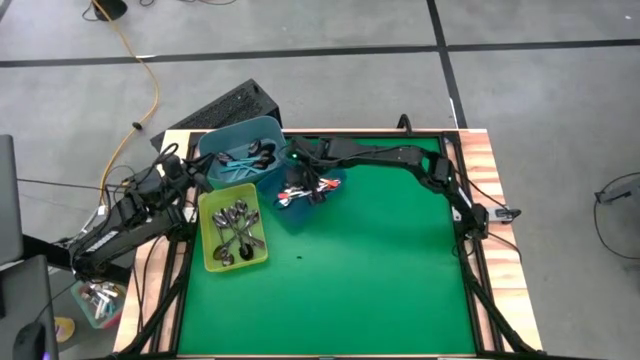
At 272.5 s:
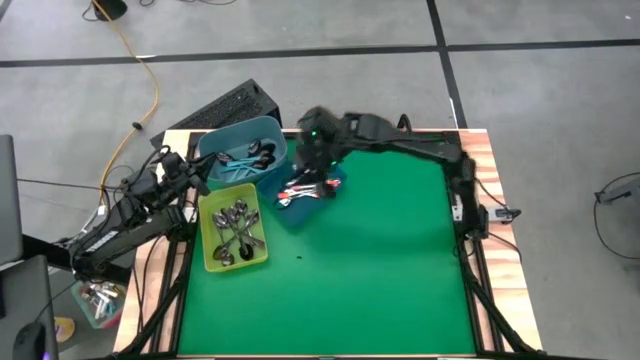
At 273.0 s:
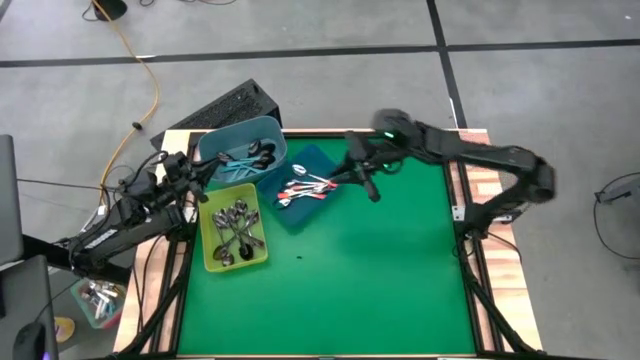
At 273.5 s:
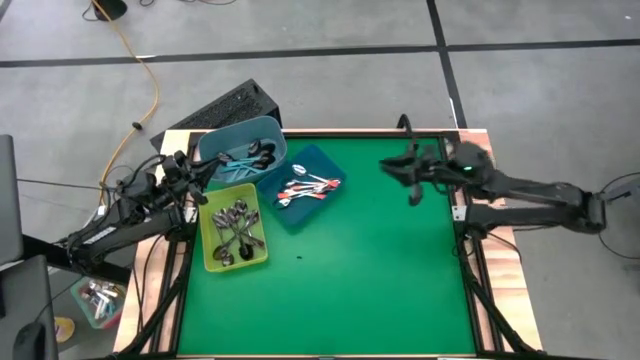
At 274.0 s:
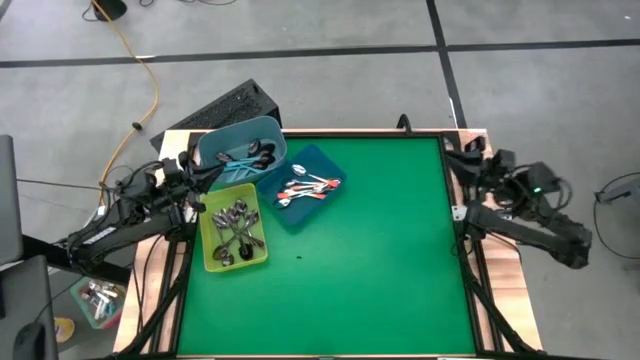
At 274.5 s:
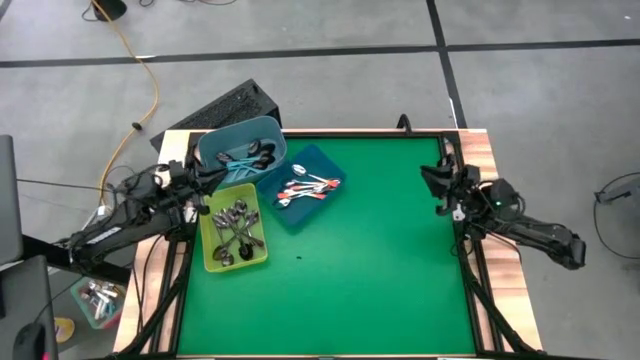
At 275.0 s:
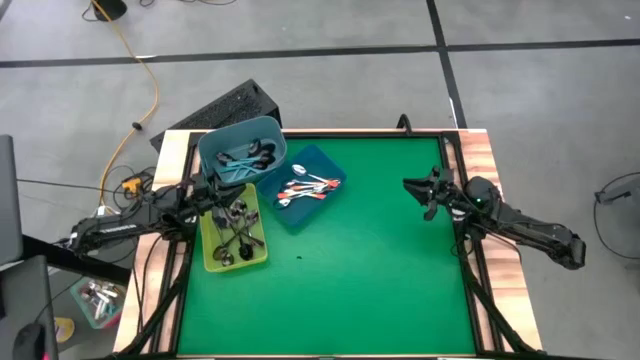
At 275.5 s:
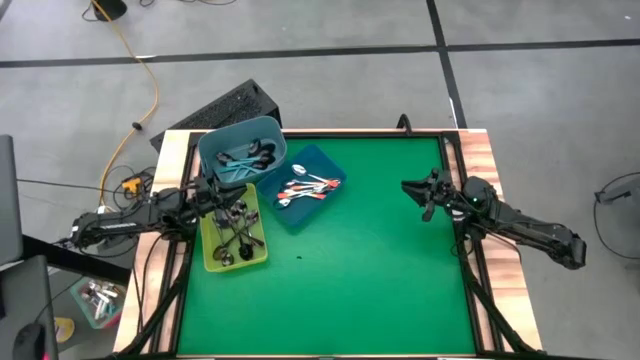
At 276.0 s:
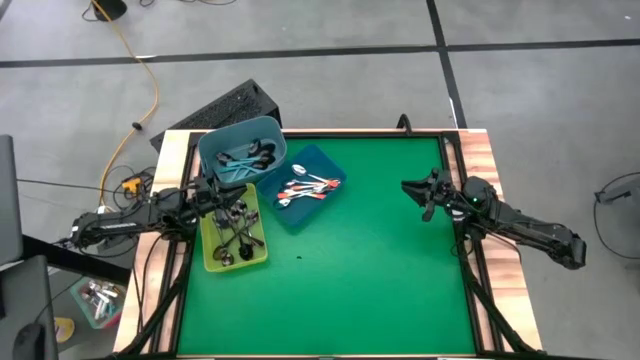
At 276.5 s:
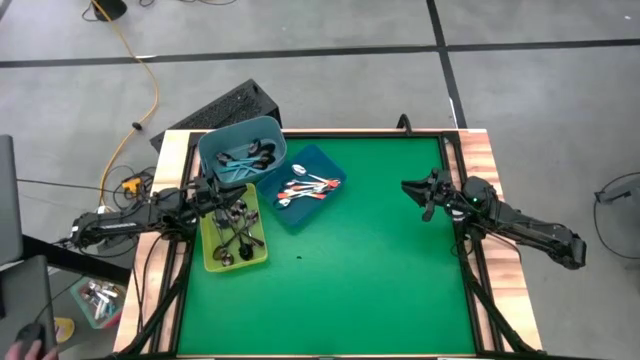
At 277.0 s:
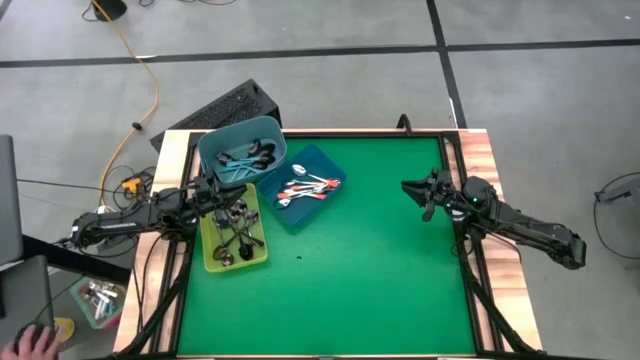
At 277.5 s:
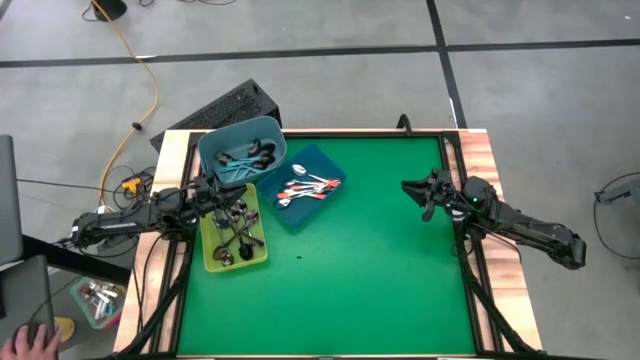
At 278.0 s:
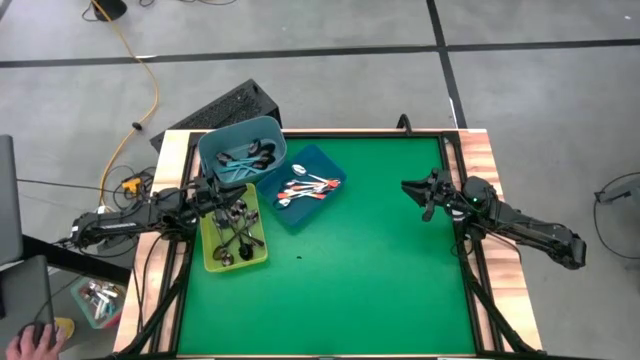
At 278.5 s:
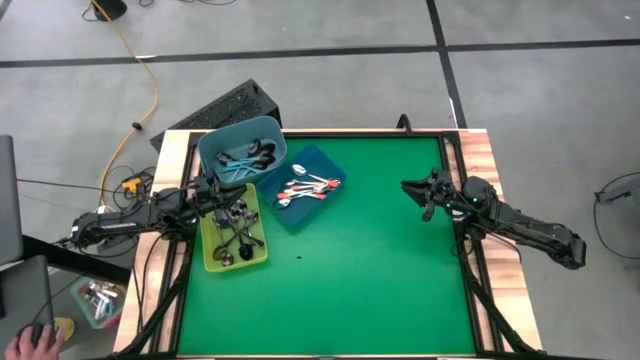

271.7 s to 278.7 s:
Task: Sort silverware by color (type)
Return to Home Position

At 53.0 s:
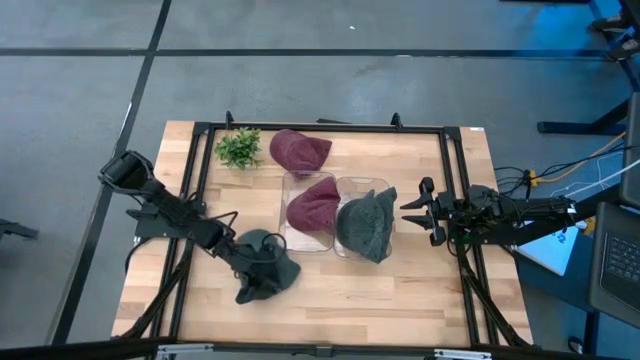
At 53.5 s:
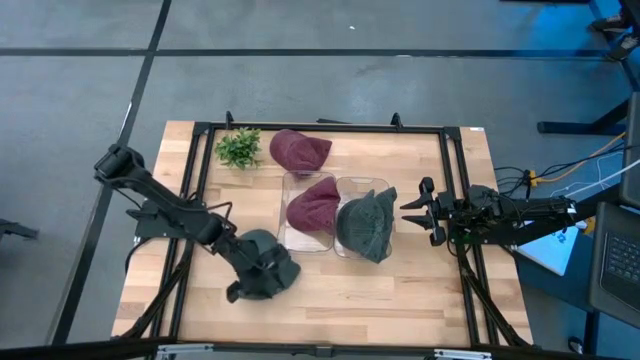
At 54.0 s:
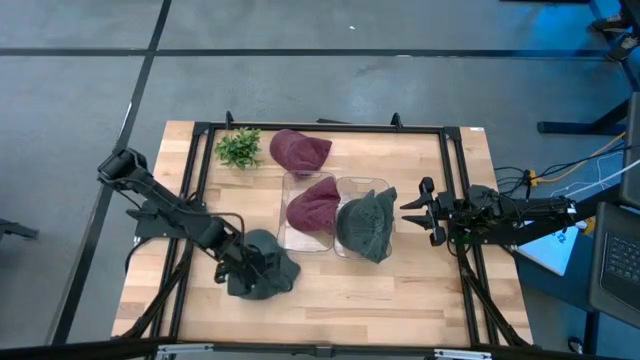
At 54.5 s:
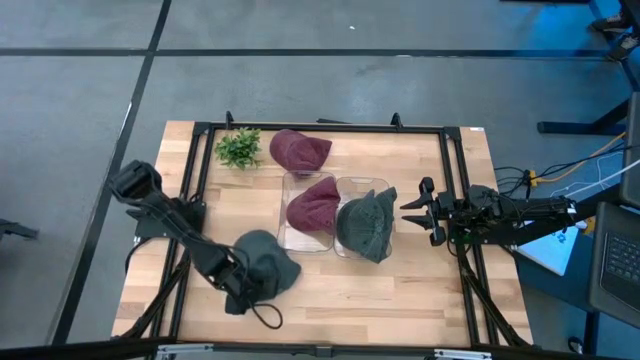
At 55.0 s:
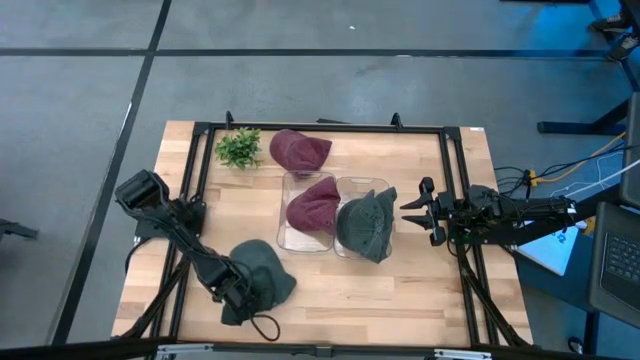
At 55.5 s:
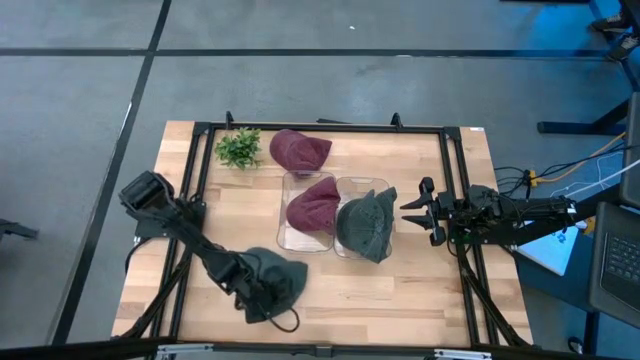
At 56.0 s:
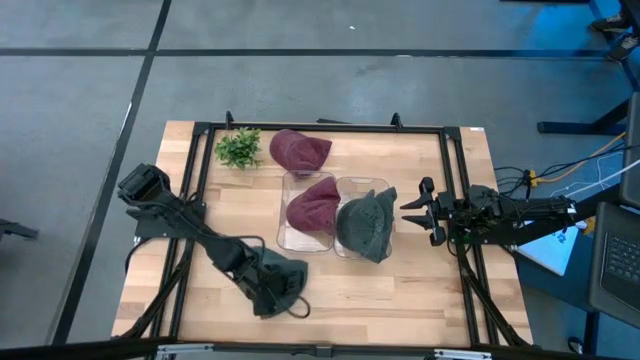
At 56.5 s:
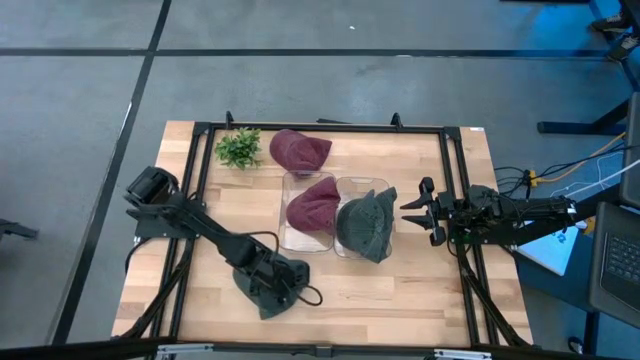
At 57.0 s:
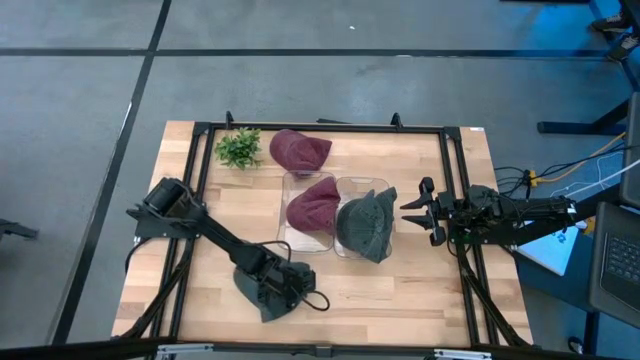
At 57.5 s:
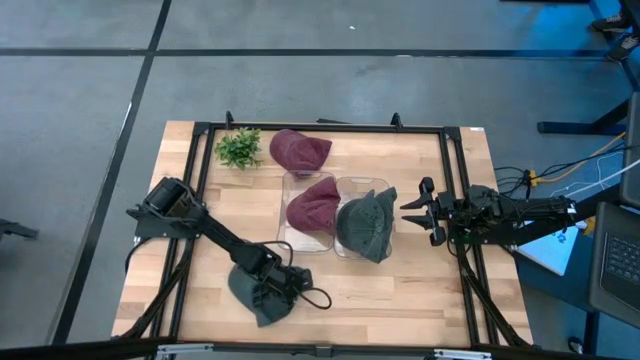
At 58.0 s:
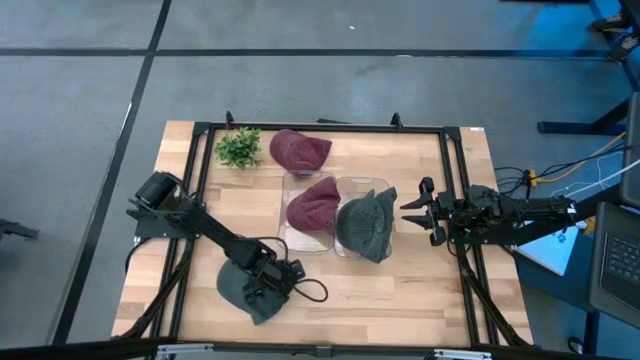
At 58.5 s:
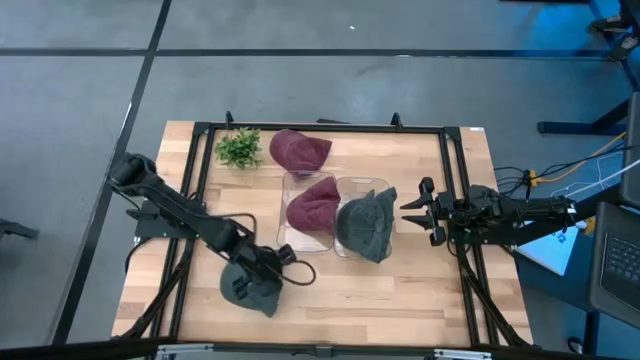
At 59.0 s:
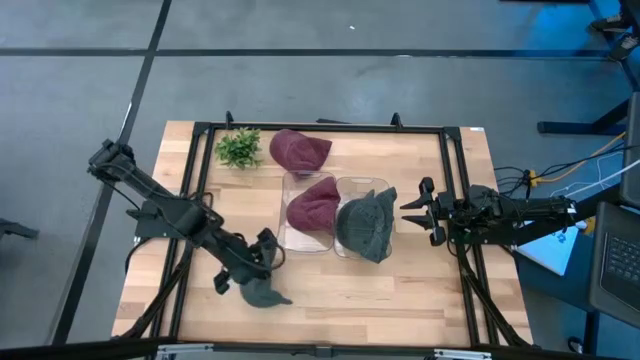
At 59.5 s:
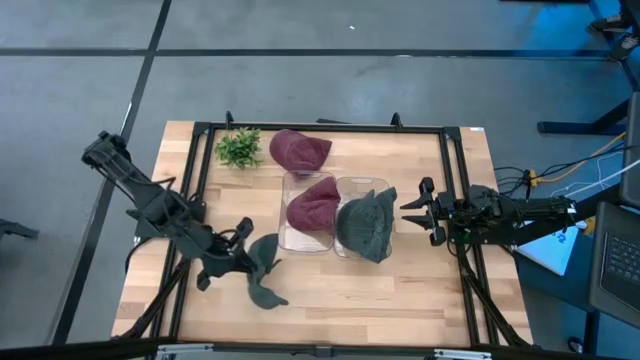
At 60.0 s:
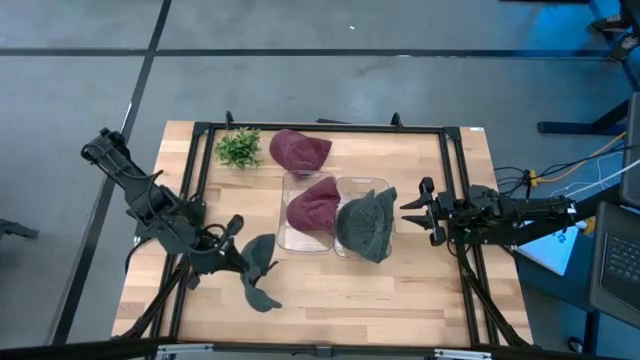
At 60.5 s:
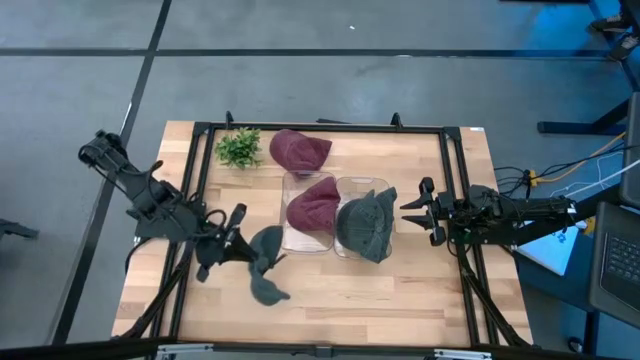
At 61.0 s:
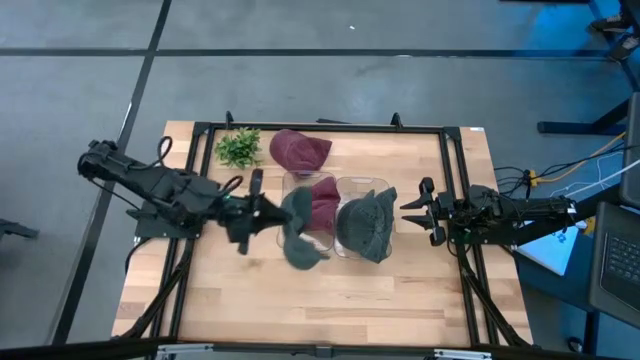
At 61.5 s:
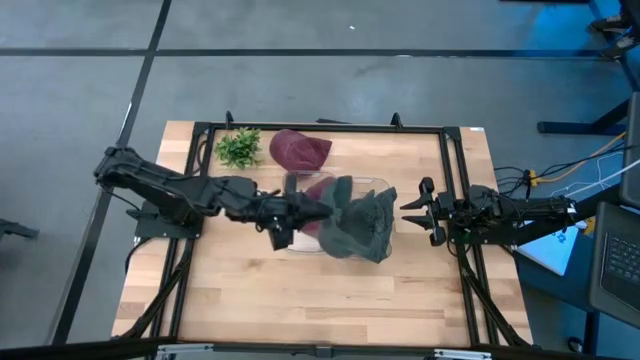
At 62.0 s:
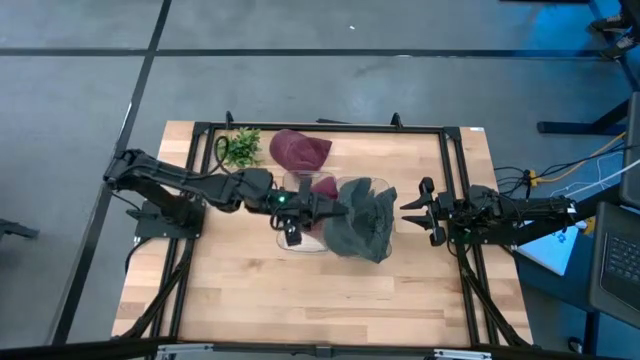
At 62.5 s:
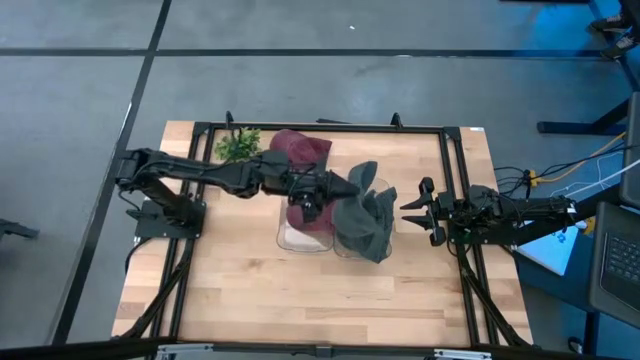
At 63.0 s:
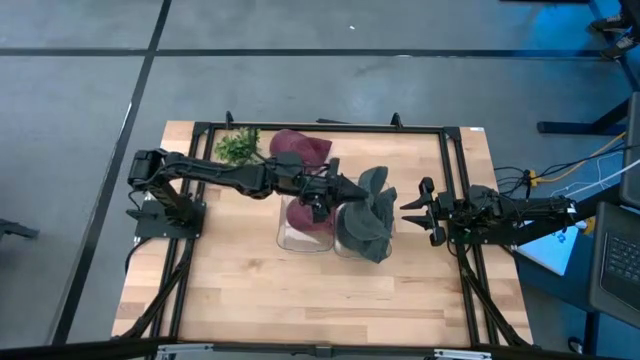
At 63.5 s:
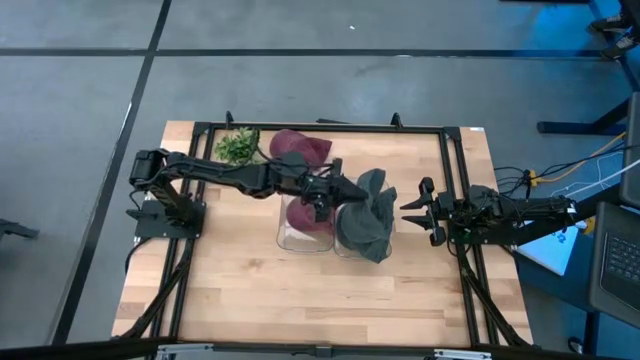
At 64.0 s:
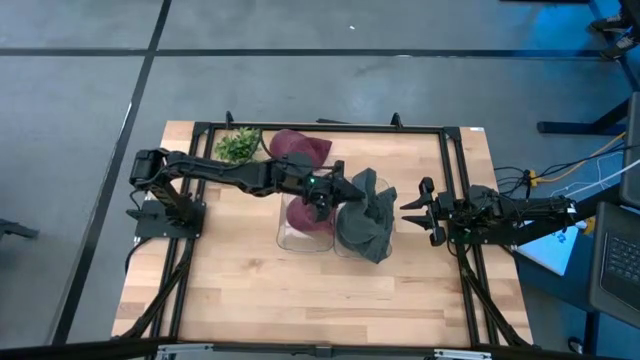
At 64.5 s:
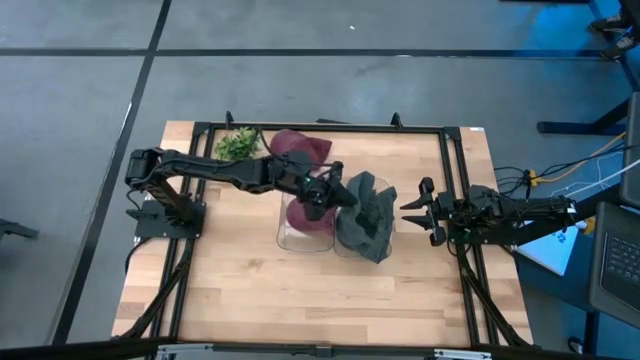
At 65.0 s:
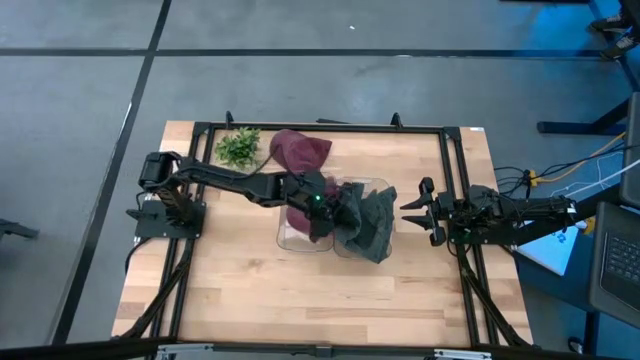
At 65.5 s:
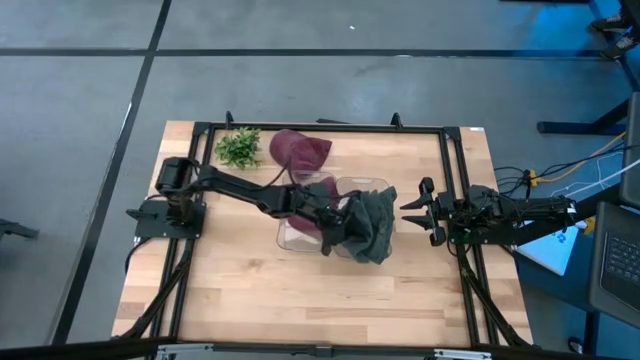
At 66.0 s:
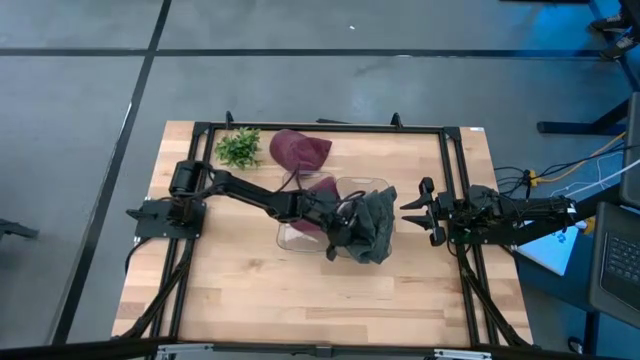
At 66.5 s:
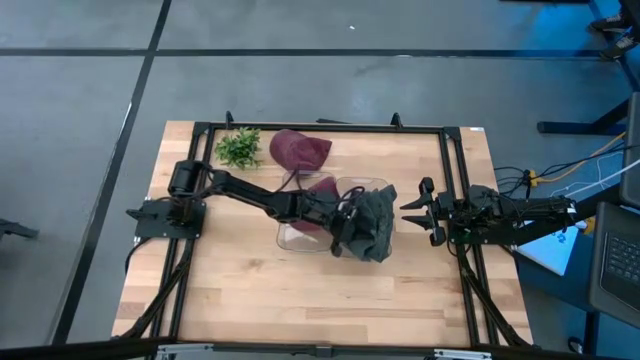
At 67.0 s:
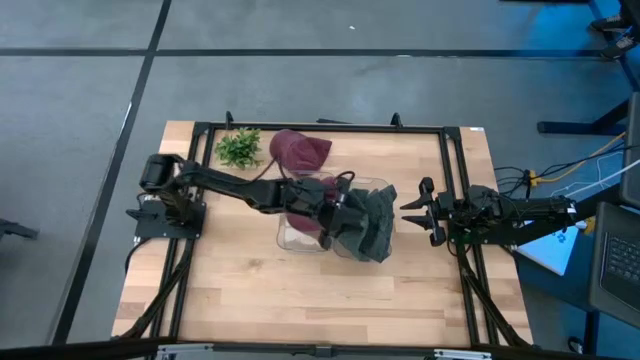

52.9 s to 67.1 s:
Task: Pick & Place hat
Put the blue cap into the right transparent bin
